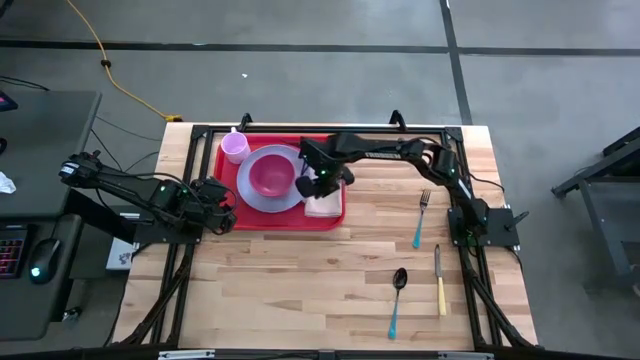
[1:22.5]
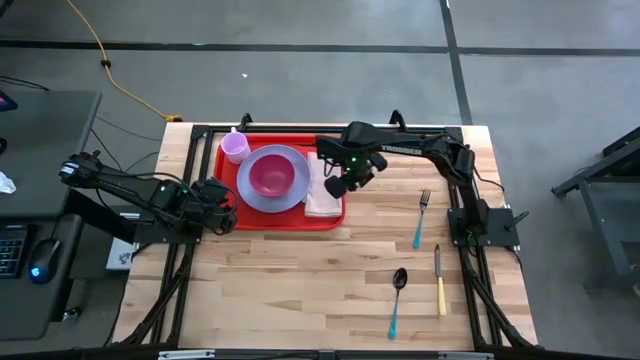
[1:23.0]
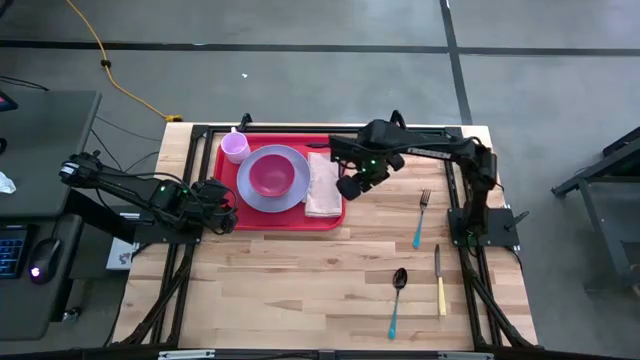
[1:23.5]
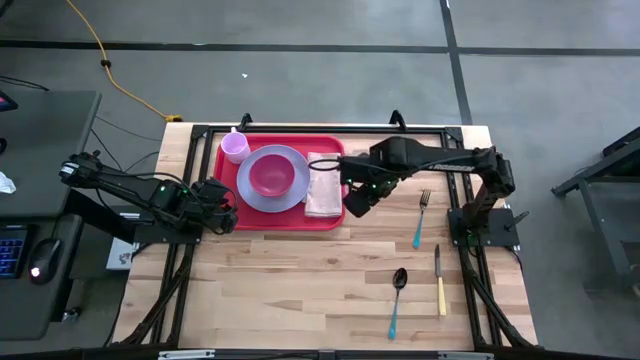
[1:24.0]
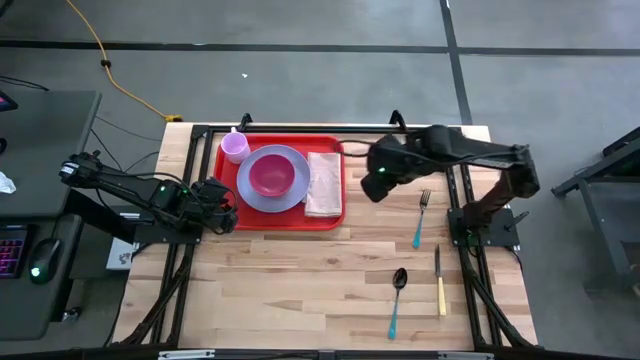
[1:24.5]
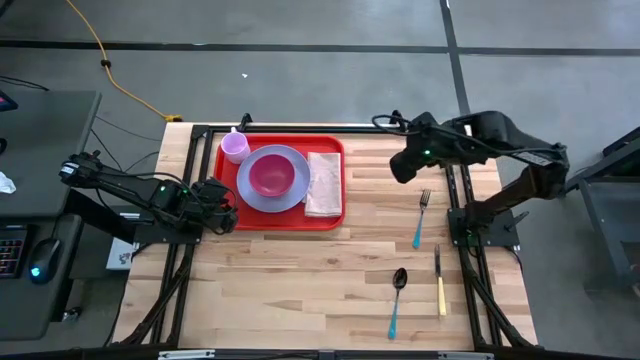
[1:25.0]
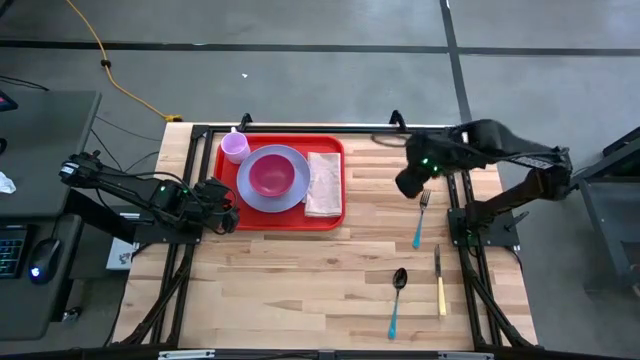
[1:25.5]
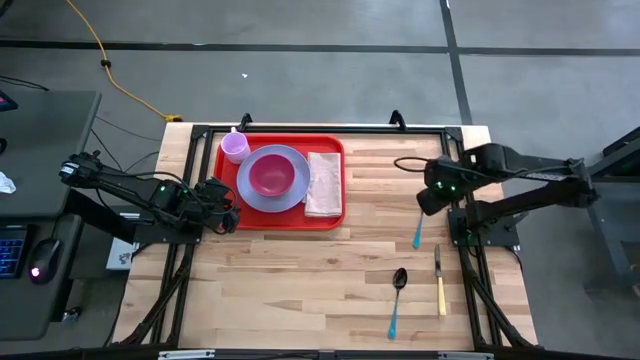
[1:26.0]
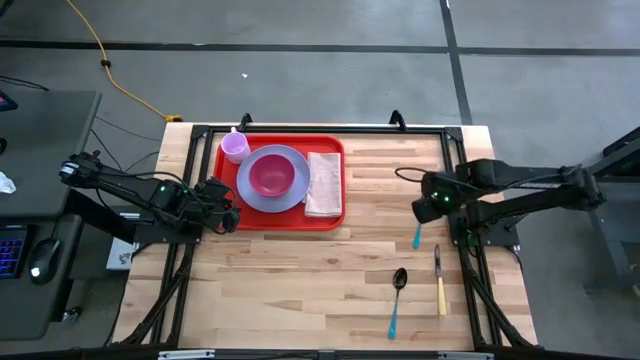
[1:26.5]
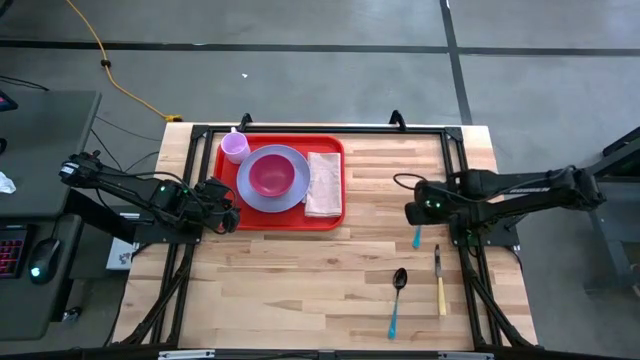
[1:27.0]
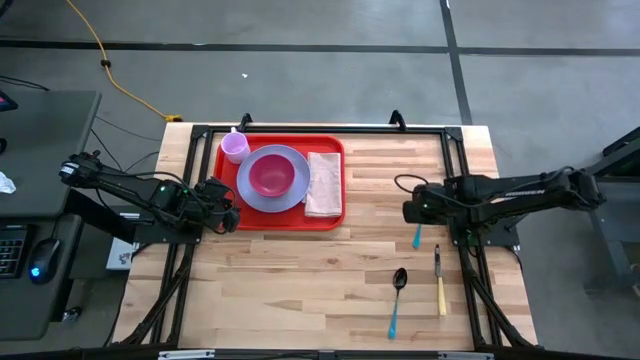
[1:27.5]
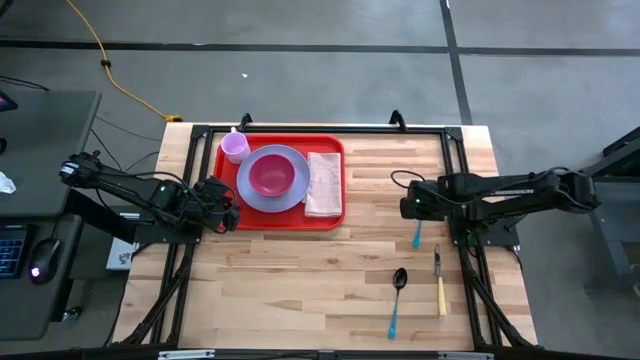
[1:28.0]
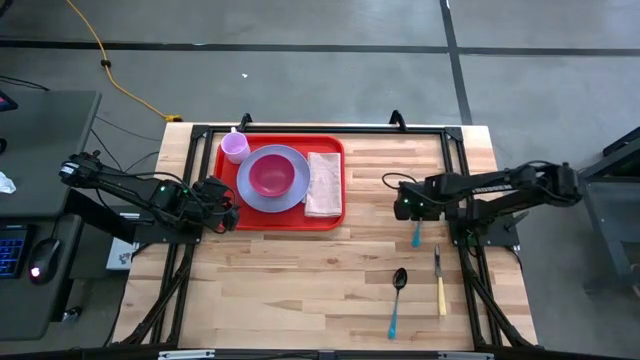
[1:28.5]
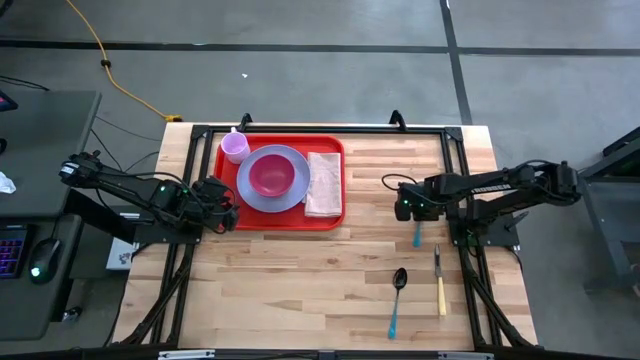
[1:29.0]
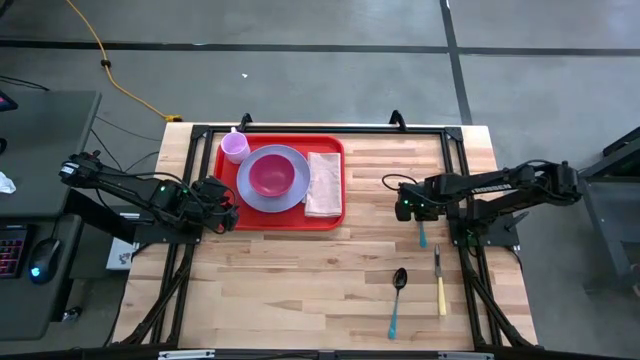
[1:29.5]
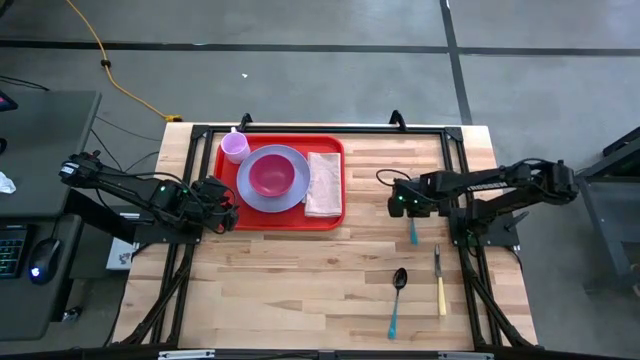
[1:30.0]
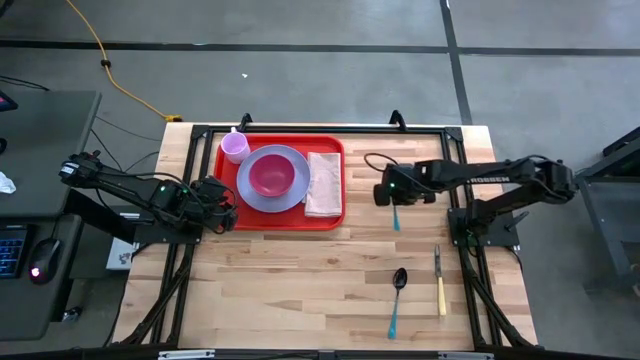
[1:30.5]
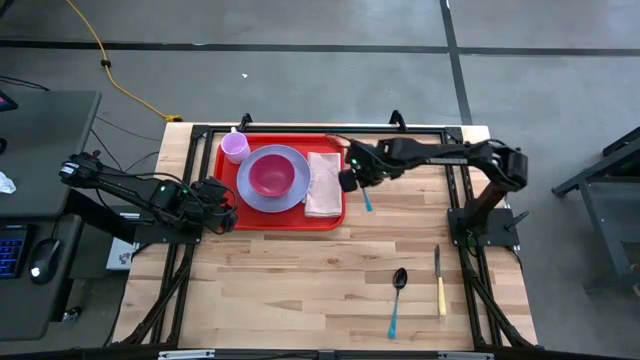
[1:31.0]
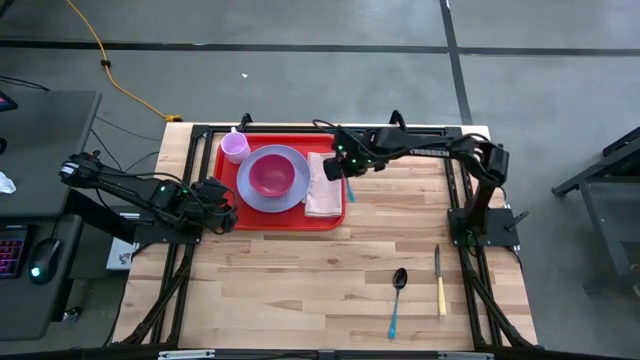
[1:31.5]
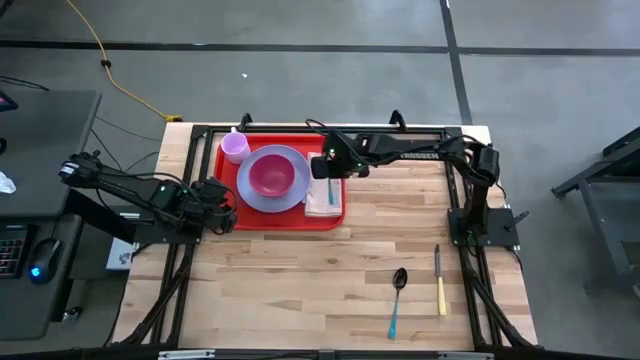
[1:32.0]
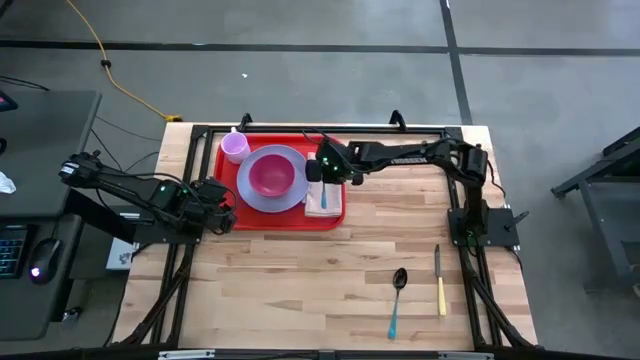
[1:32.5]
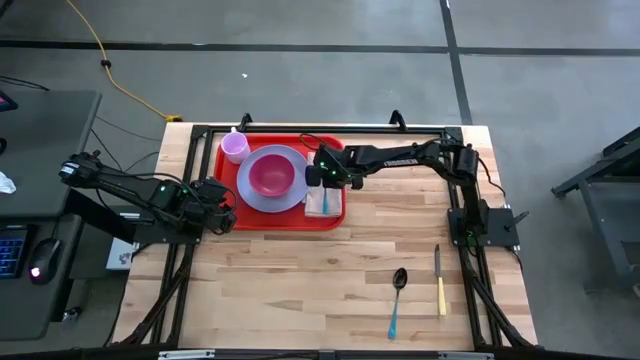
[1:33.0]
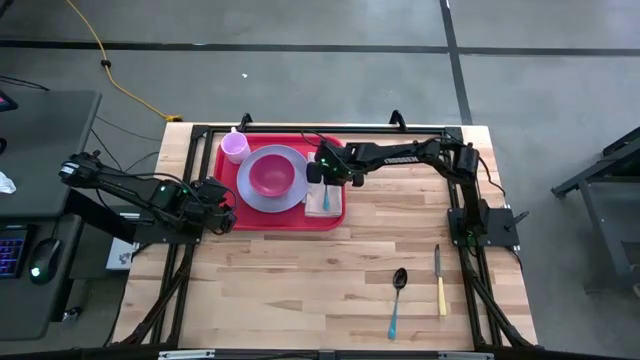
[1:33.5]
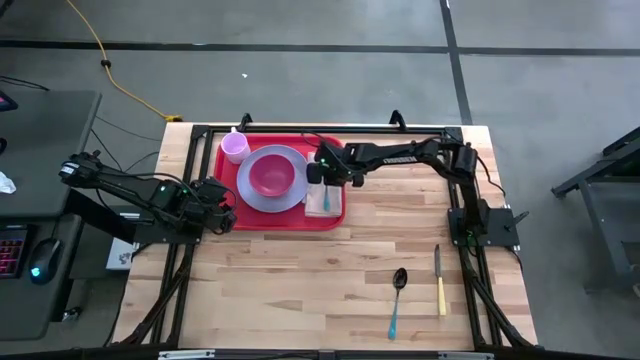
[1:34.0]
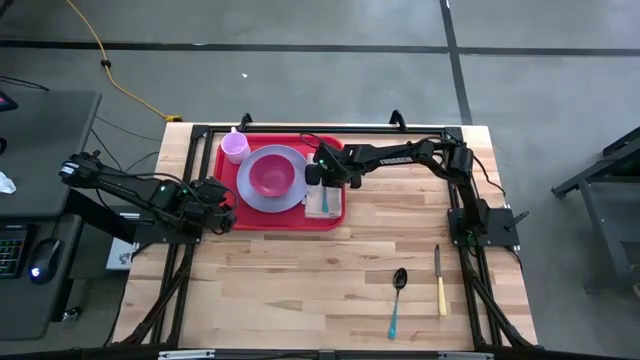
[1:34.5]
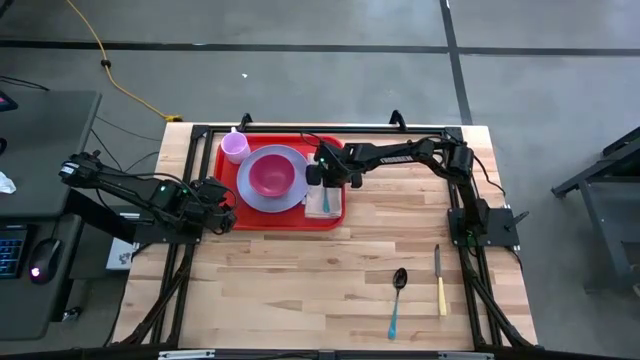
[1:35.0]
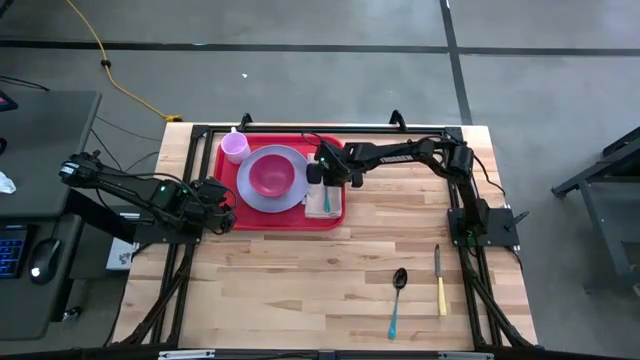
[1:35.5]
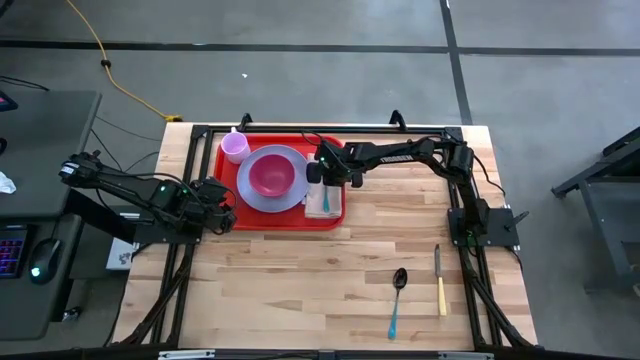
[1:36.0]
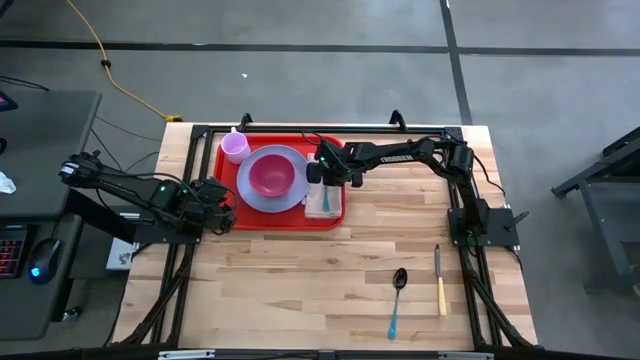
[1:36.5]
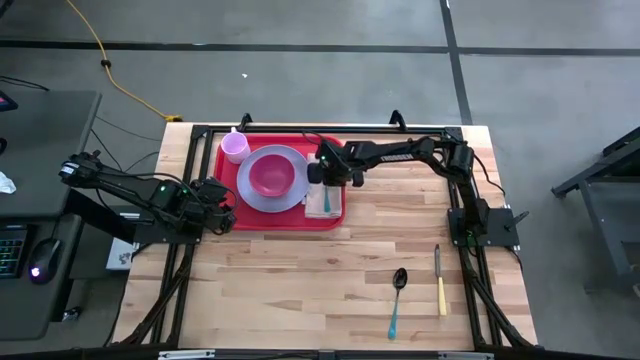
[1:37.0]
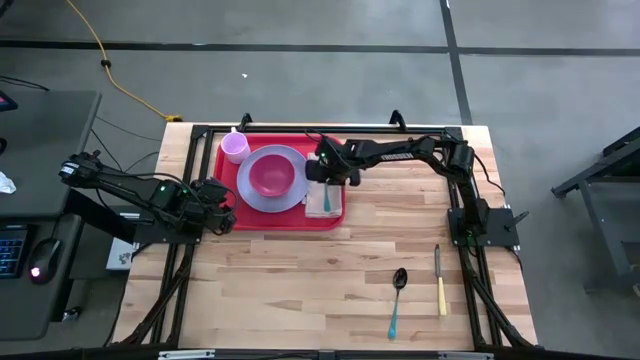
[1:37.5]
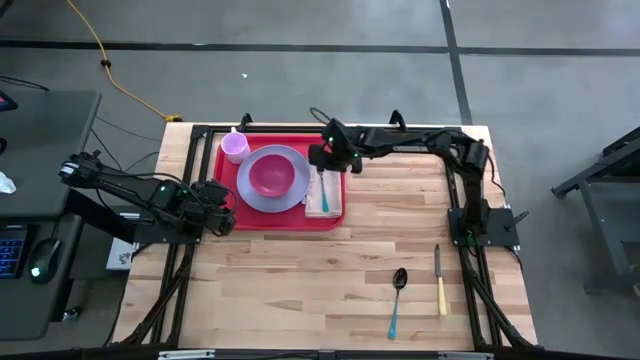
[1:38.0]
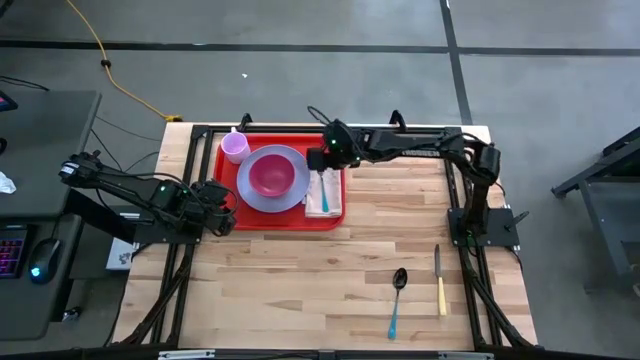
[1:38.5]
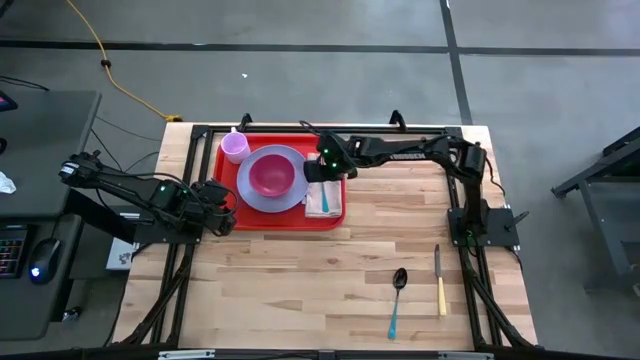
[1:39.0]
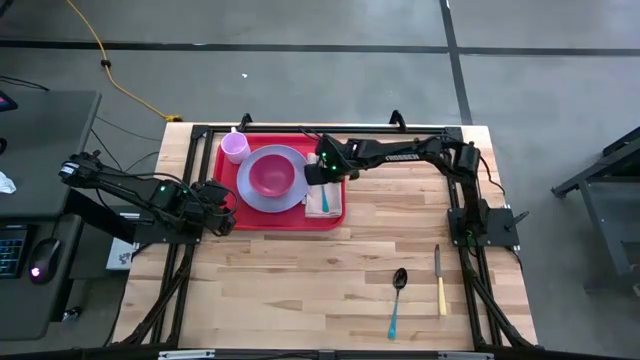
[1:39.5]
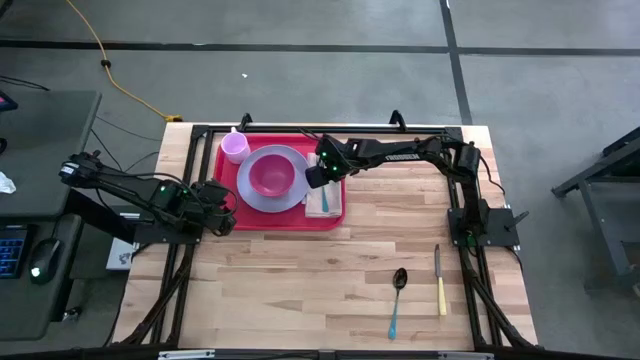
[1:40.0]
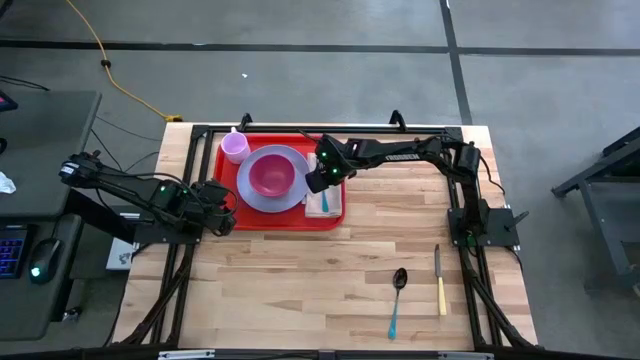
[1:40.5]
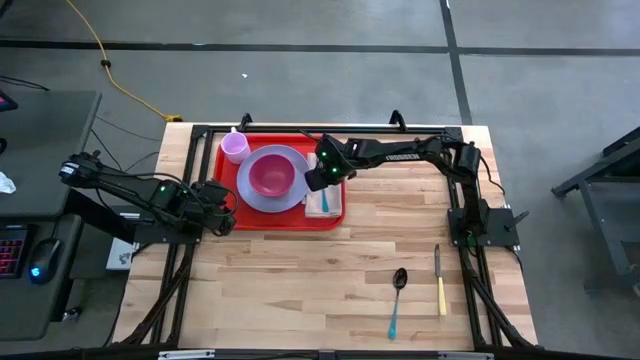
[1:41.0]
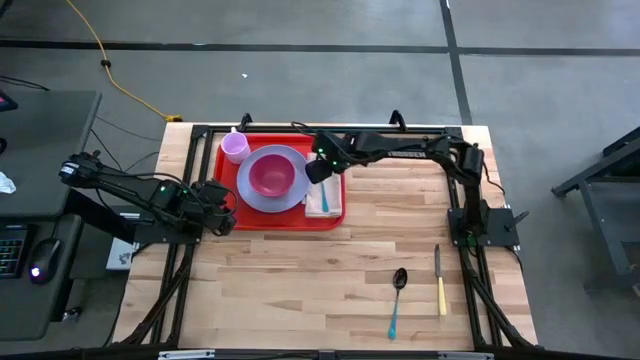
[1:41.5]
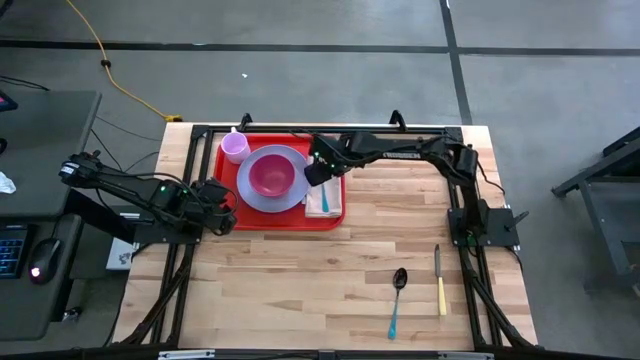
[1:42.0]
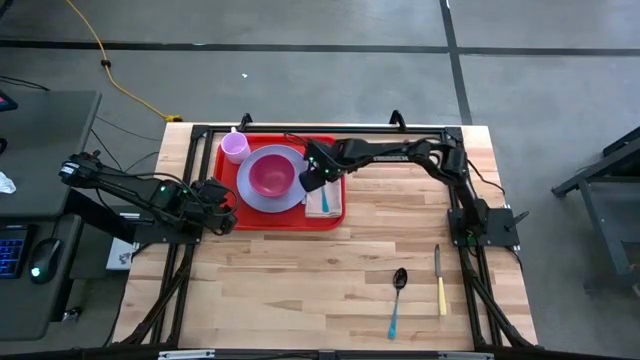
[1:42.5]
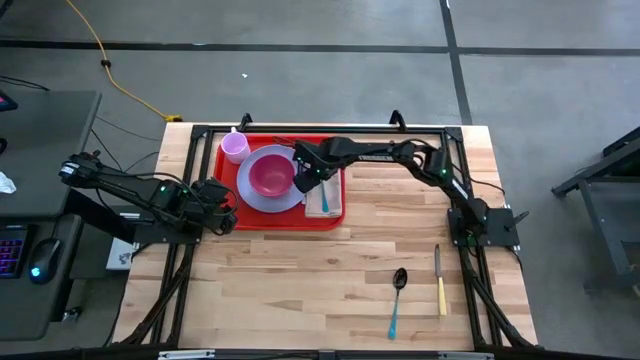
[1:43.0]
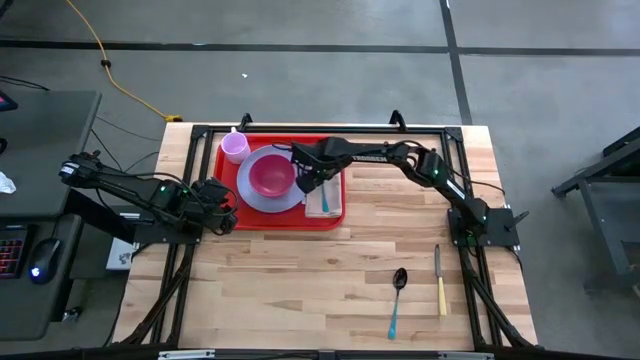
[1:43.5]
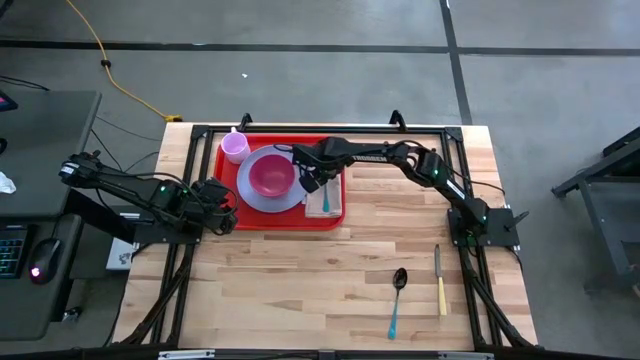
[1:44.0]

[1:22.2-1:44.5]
Task: Set up tray
Put the blue fork on the brown napkin
